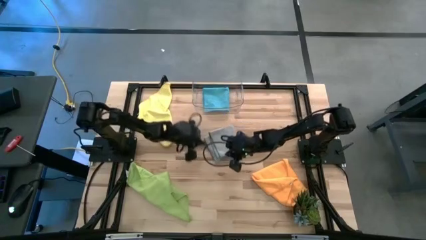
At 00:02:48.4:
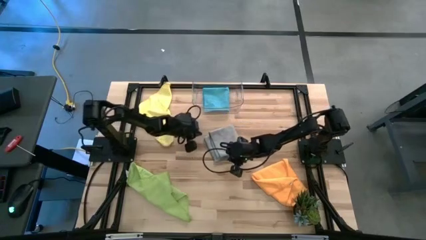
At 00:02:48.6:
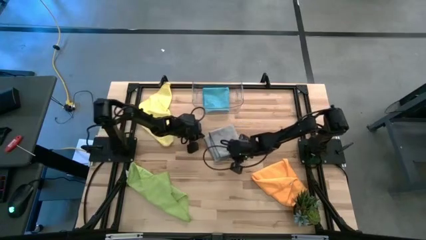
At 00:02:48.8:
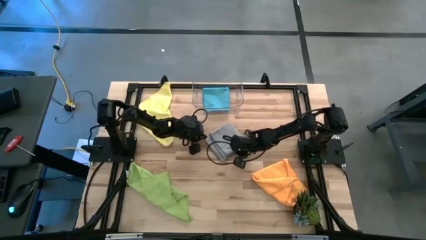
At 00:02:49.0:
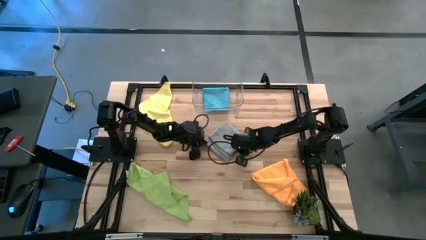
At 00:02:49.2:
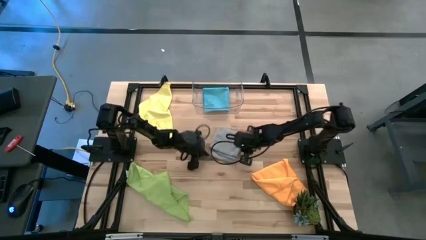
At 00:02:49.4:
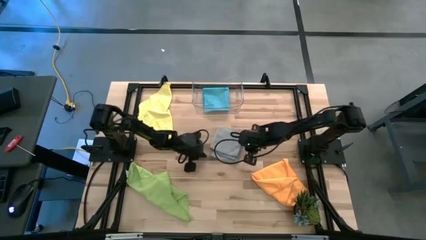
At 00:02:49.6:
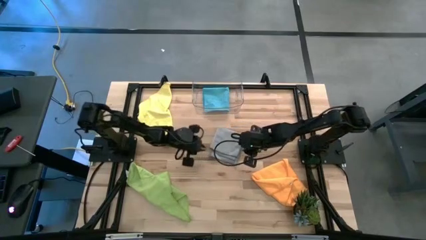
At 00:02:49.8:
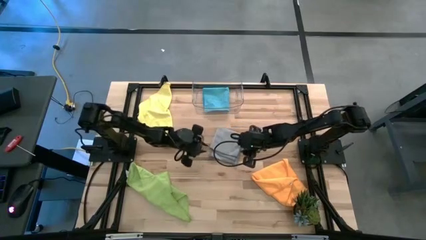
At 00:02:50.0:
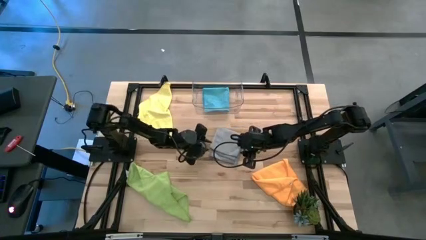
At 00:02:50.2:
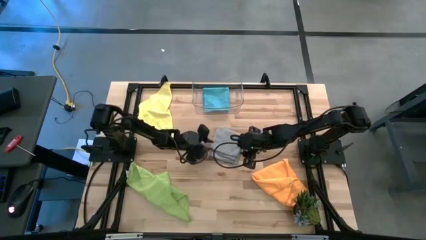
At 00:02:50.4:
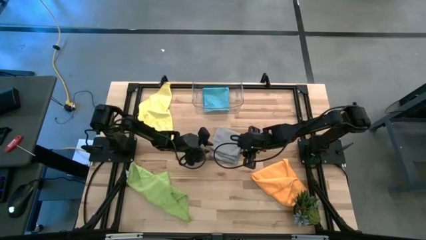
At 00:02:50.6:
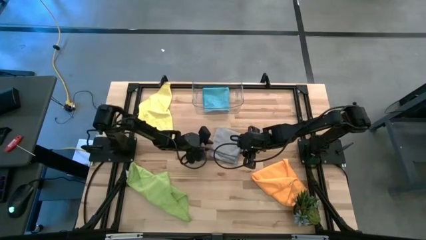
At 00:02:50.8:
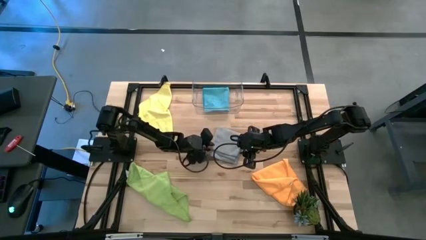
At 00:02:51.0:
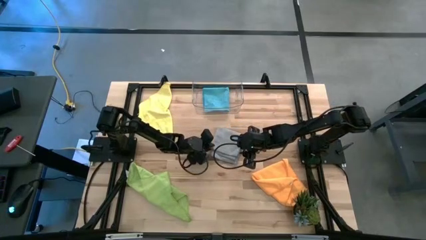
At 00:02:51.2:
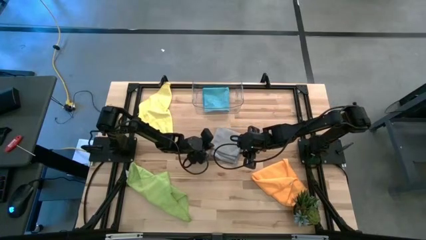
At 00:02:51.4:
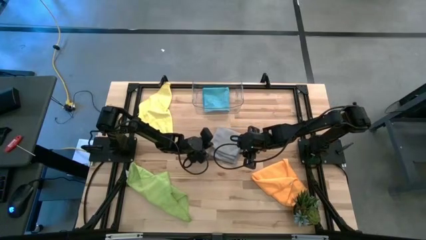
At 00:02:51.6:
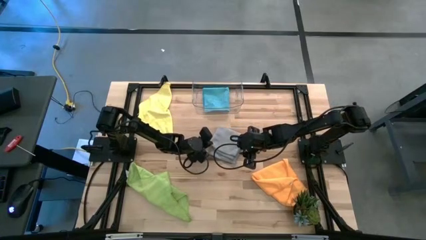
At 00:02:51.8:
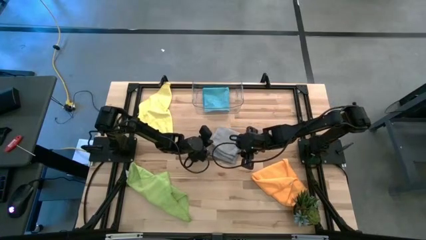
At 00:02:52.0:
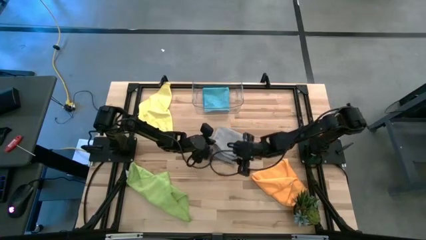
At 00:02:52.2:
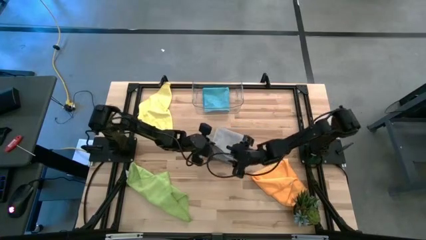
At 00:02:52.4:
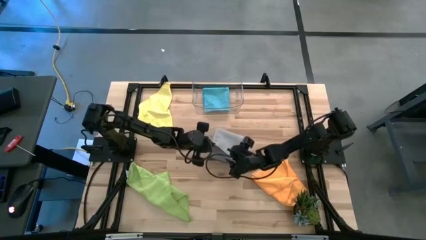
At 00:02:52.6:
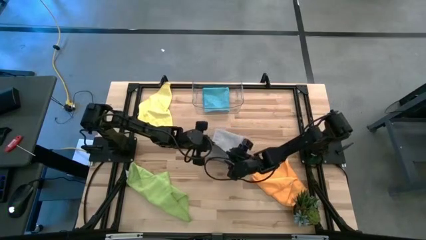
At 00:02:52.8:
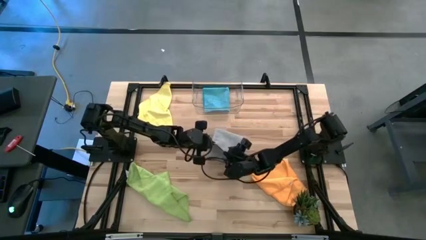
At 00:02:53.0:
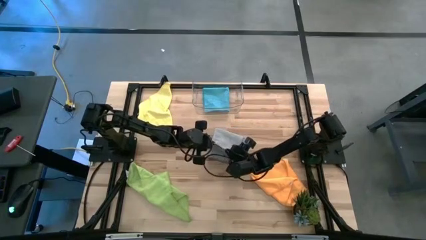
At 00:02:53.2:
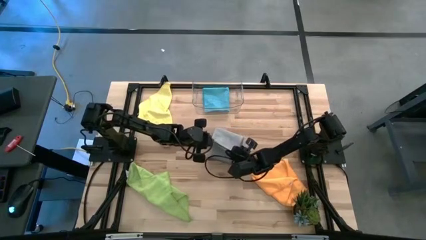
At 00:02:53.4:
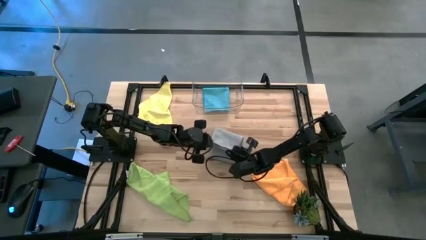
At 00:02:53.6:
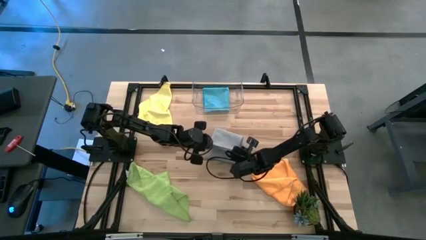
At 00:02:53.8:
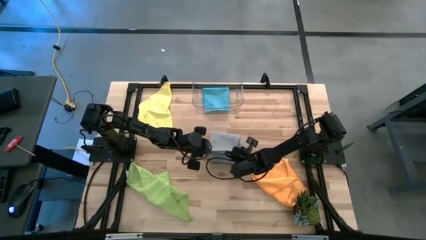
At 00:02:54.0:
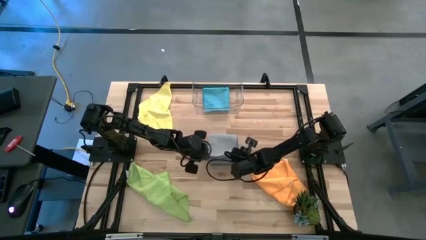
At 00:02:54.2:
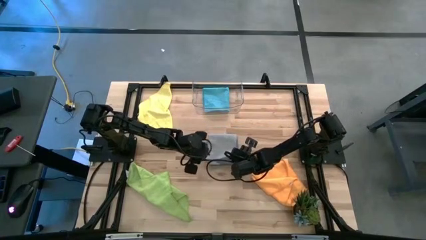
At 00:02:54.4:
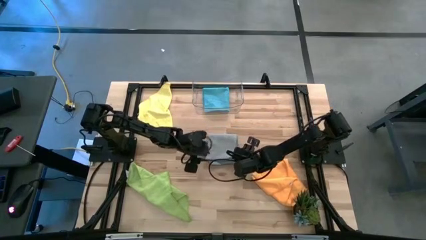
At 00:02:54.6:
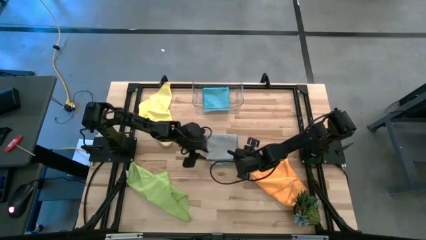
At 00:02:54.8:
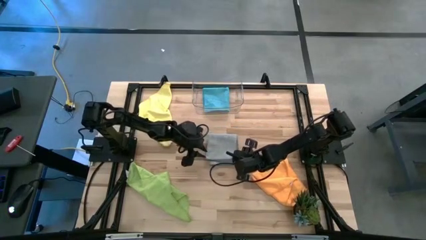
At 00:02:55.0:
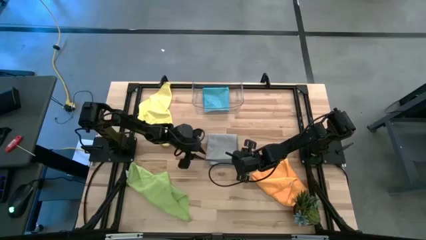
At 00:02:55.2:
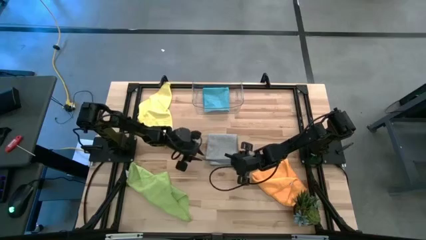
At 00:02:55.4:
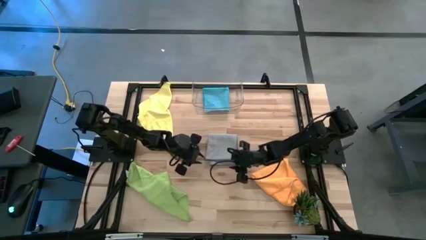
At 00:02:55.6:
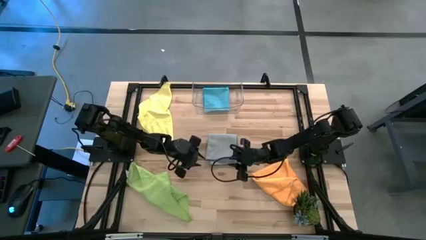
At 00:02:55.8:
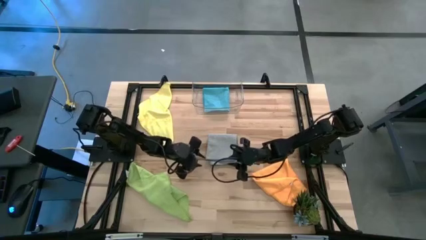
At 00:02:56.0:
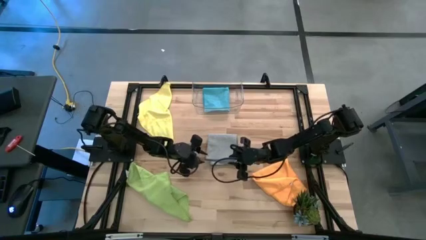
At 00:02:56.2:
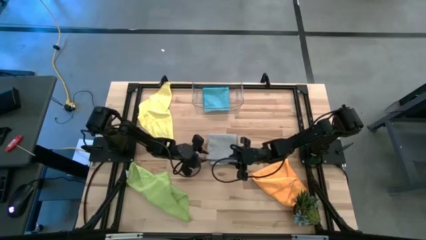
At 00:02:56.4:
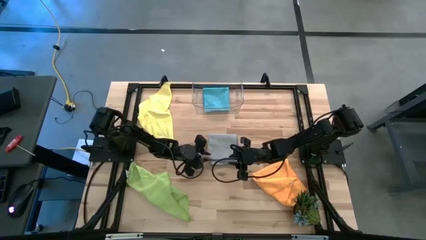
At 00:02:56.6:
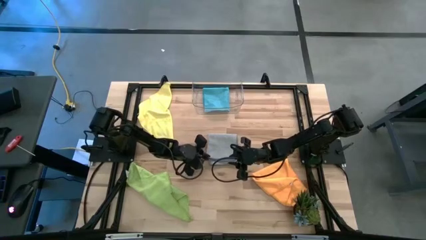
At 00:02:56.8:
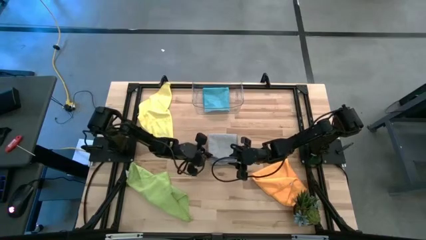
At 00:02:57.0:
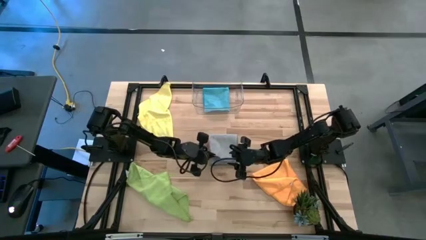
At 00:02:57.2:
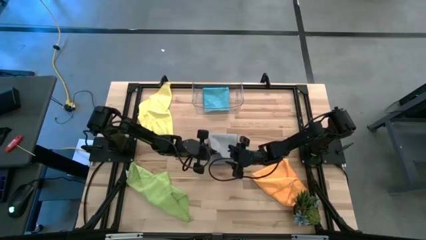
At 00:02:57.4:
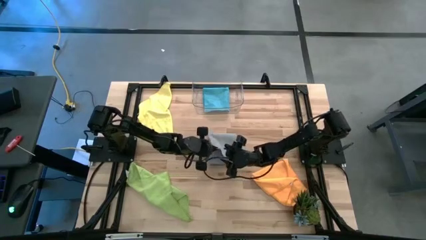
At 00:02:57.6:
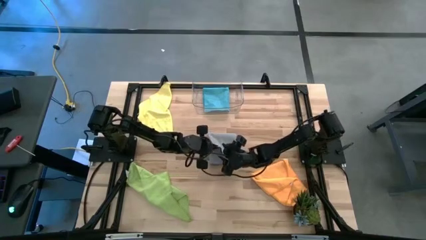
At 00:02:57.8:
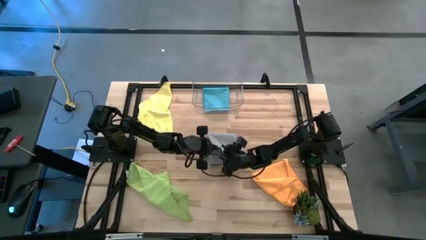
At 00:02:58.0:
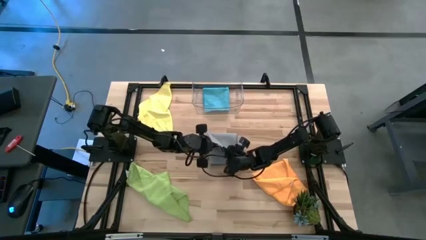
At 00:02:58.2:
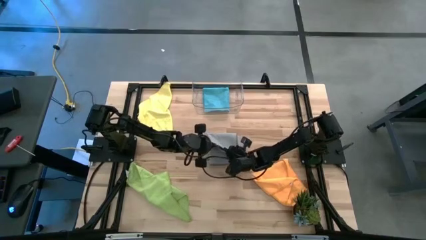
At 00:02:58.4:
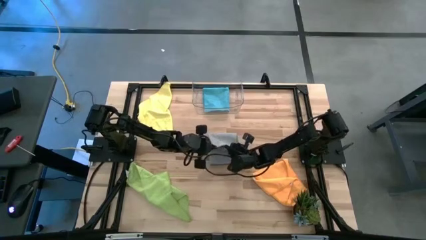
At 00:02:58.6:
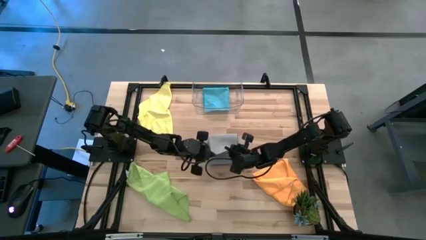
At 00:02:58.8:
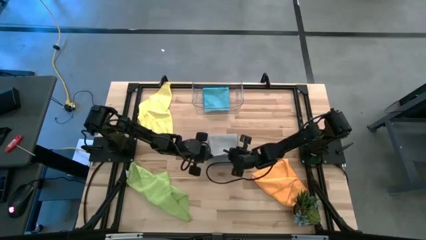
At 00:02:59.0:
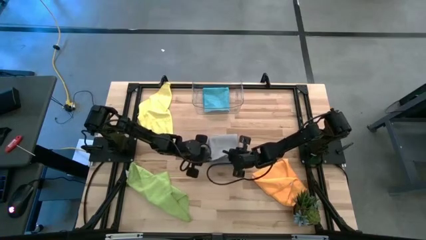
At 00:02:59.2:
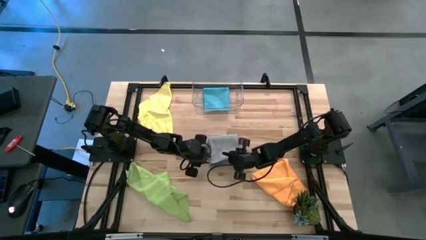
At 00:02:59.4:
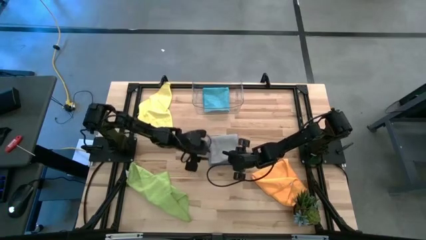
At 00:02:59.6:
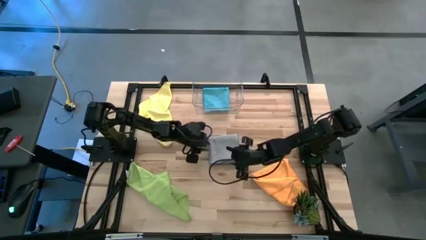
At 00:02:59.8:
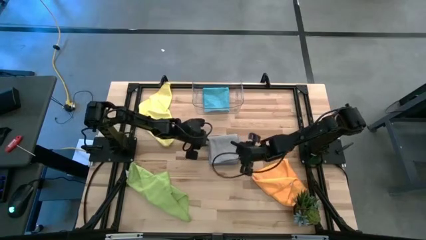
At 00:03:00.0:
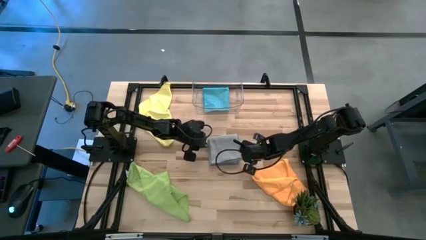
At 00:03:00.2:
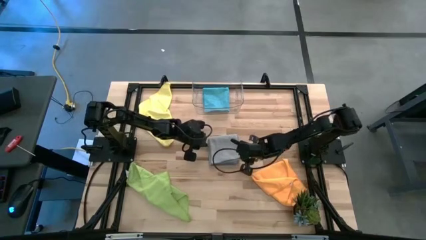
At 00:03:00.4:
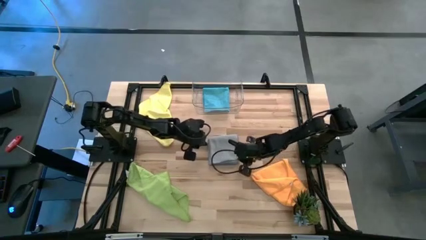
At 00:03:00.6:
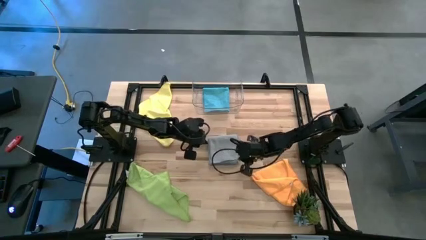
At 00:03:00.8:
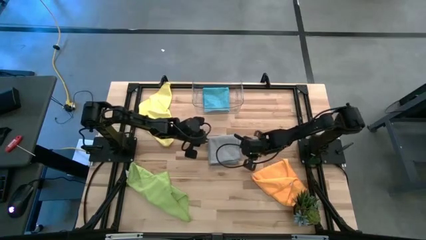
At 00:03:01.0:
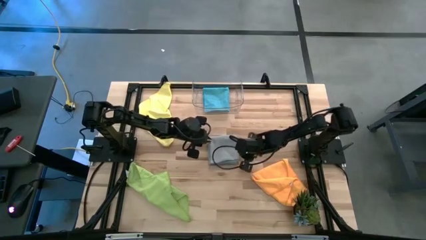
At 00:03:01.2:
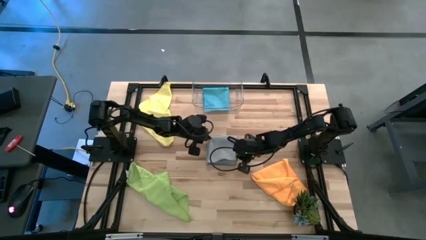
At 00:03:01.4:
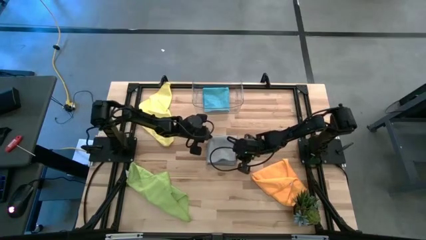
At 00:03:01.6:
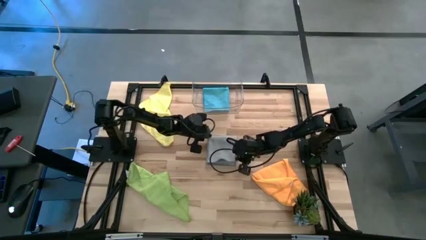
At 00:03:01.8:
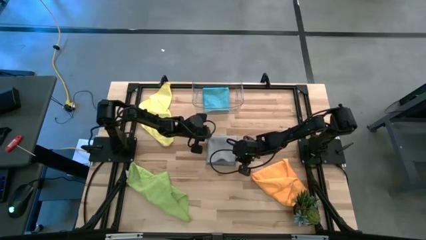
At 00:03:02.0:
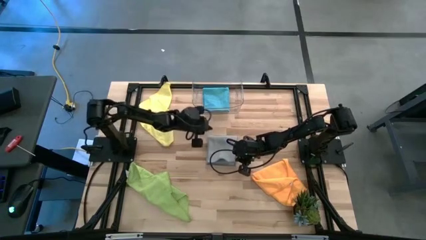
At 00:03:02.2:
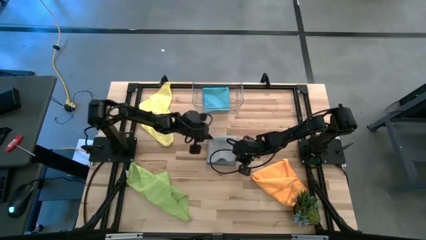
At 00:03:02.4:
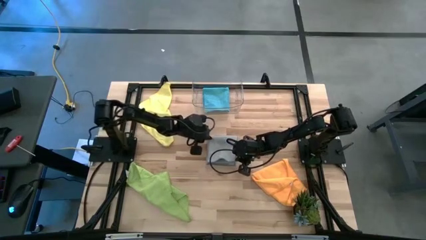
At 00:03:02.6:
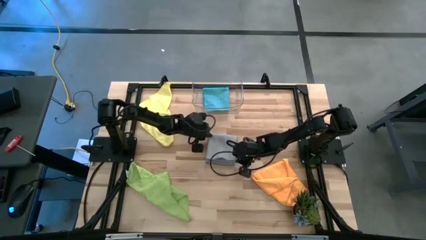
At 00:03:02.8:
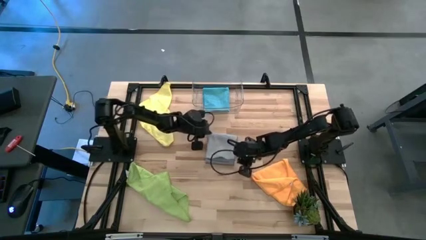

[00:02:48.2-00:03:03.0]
Task: Fold microfiber towels
Fold the gray towel
